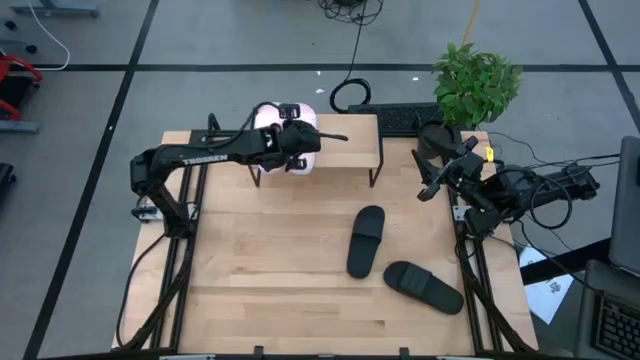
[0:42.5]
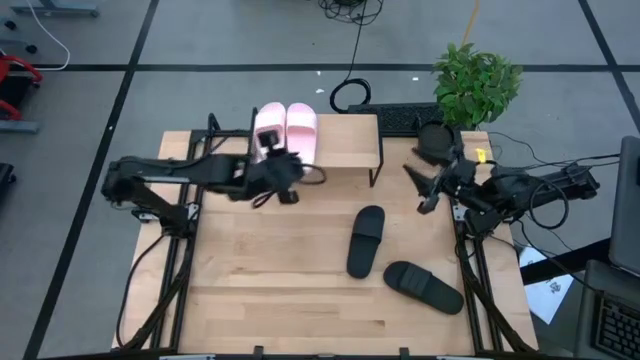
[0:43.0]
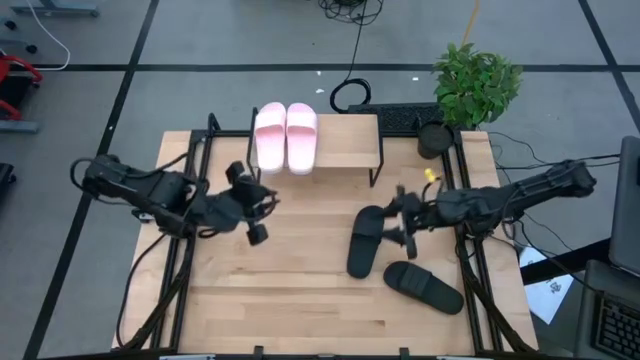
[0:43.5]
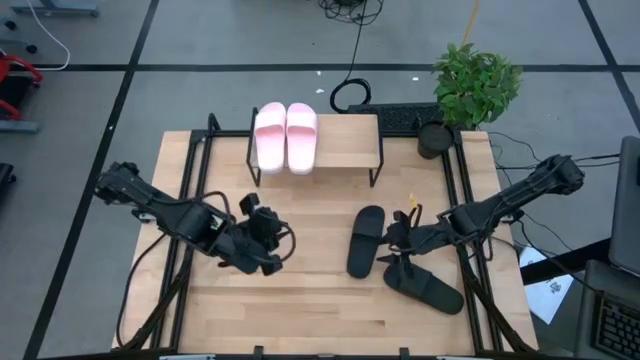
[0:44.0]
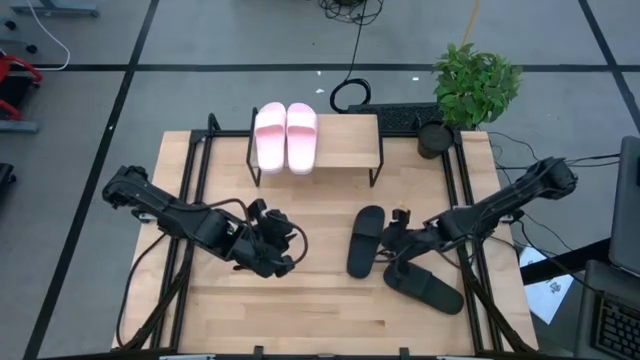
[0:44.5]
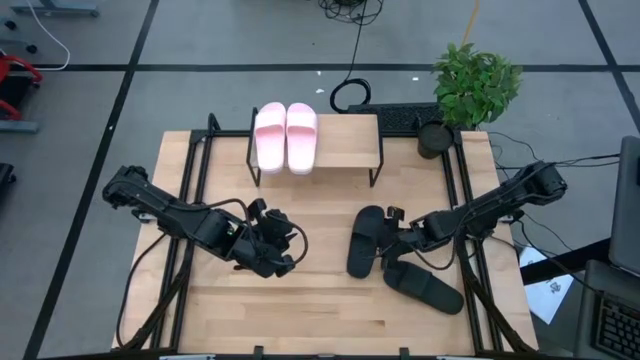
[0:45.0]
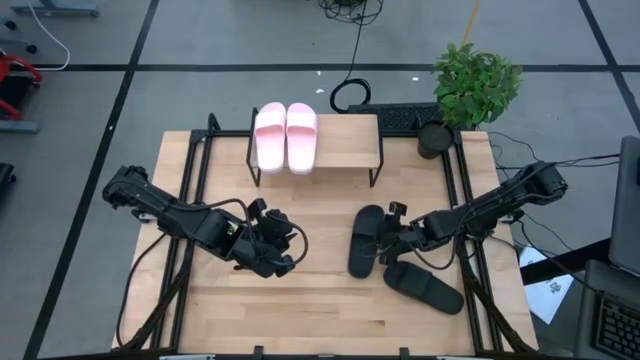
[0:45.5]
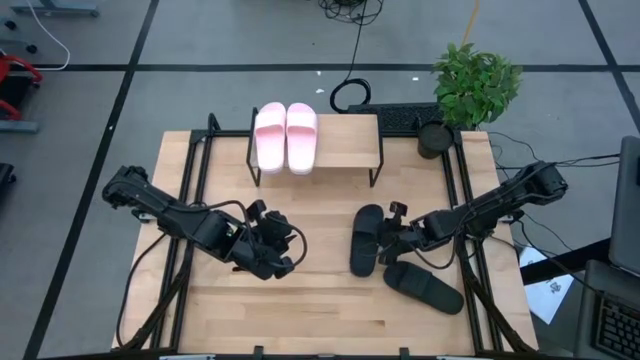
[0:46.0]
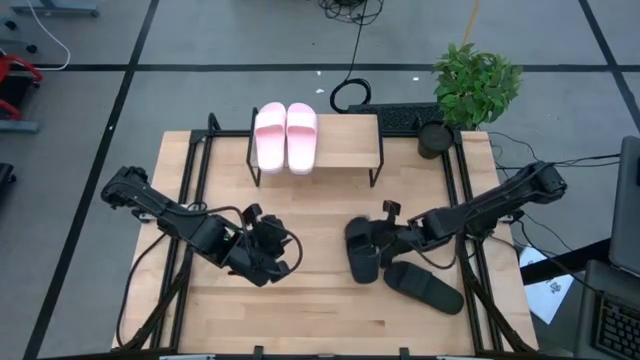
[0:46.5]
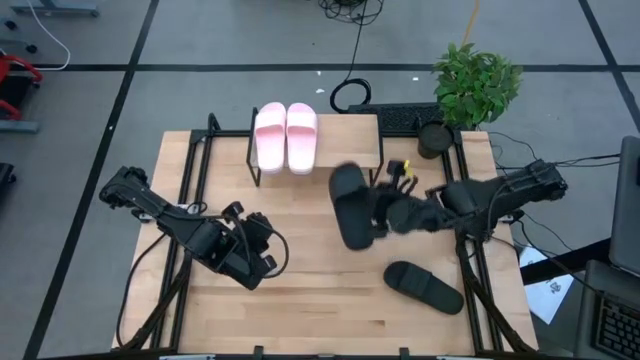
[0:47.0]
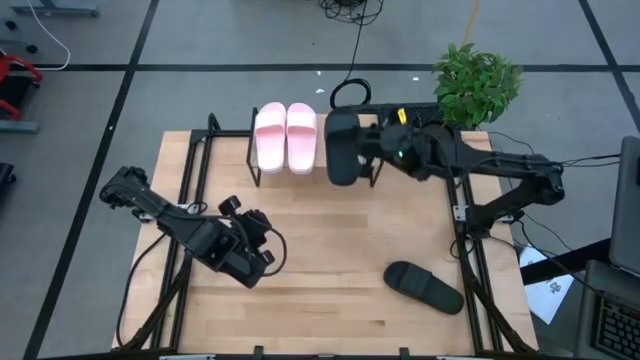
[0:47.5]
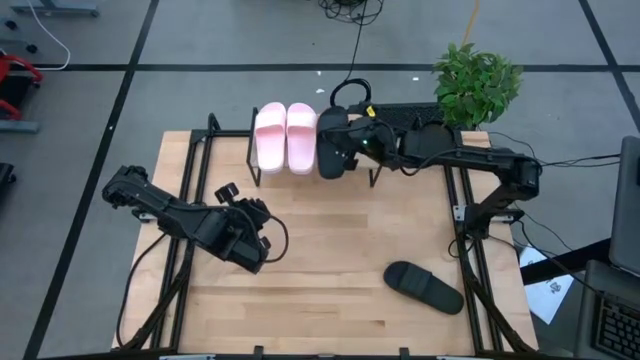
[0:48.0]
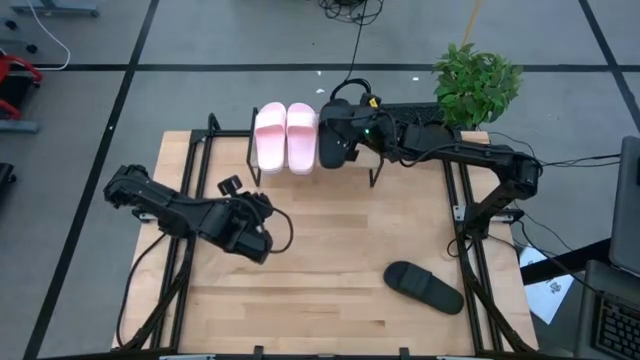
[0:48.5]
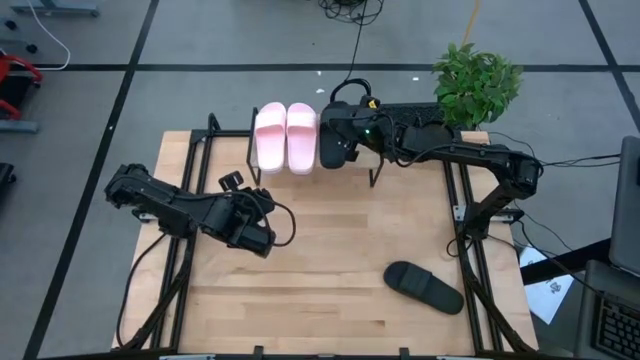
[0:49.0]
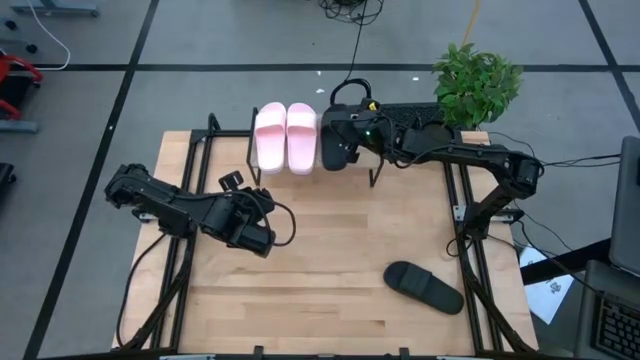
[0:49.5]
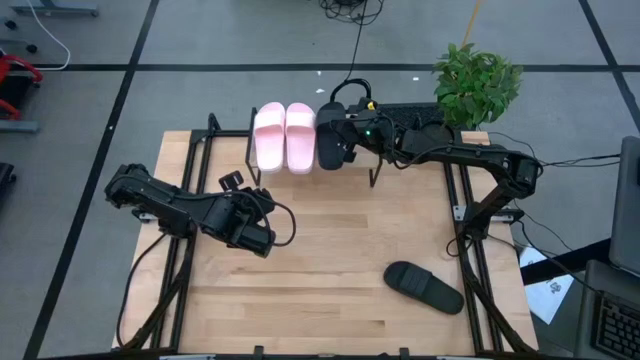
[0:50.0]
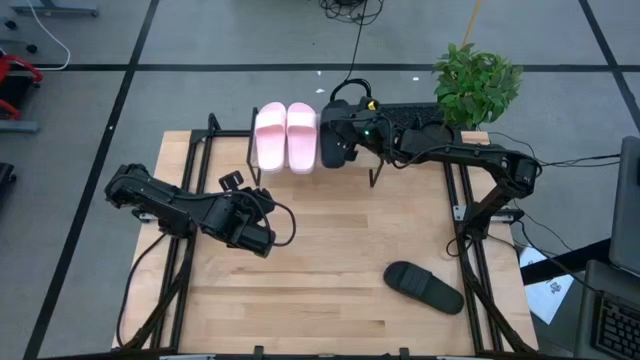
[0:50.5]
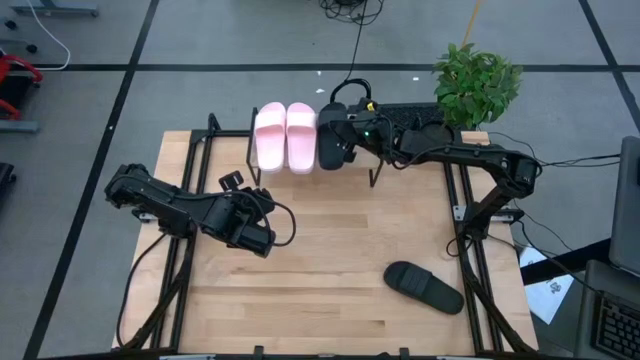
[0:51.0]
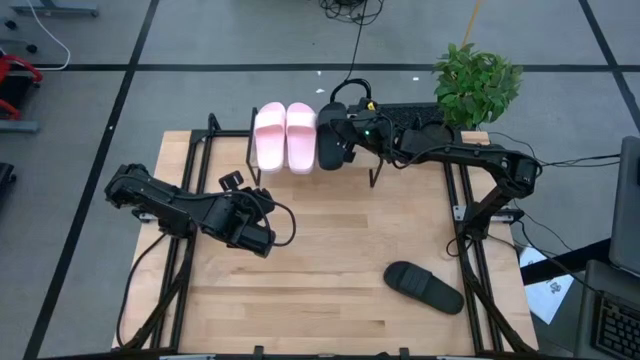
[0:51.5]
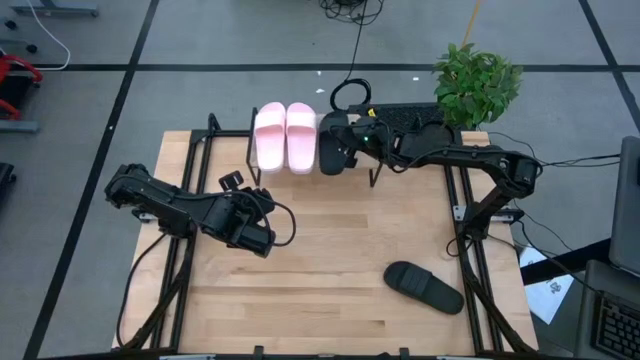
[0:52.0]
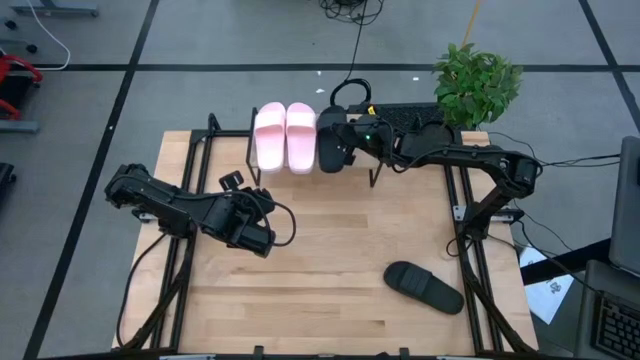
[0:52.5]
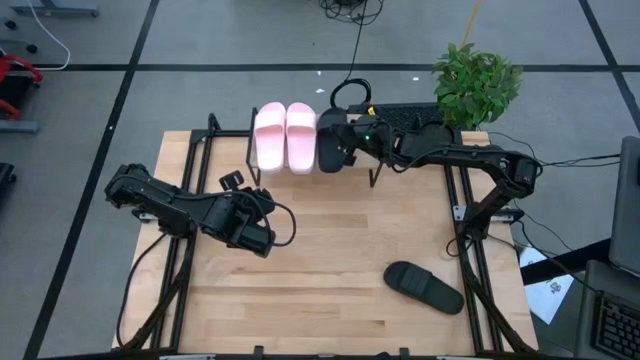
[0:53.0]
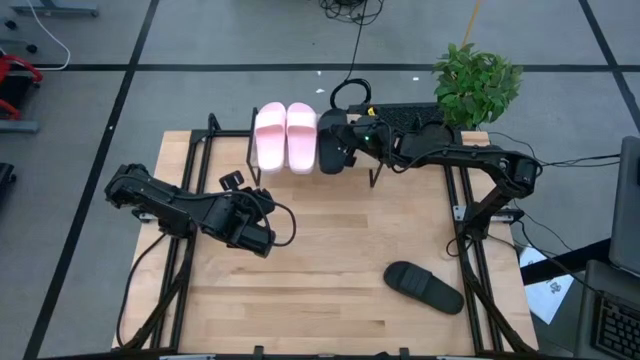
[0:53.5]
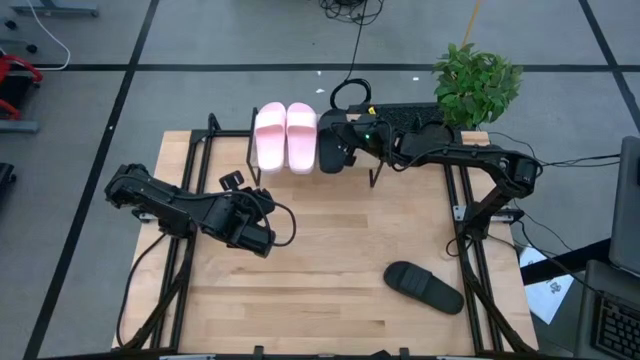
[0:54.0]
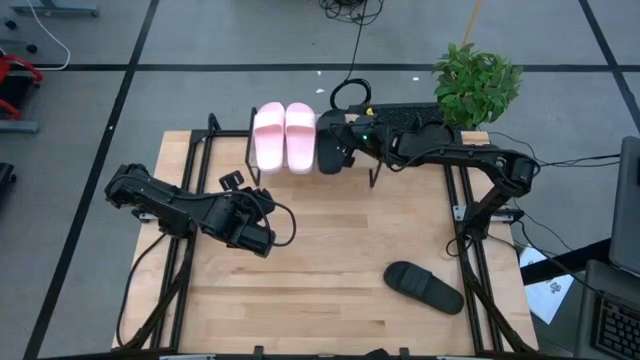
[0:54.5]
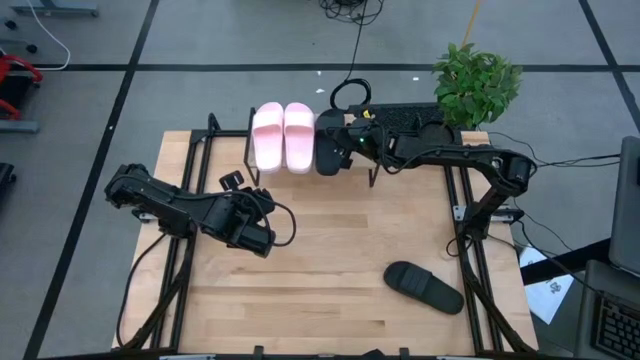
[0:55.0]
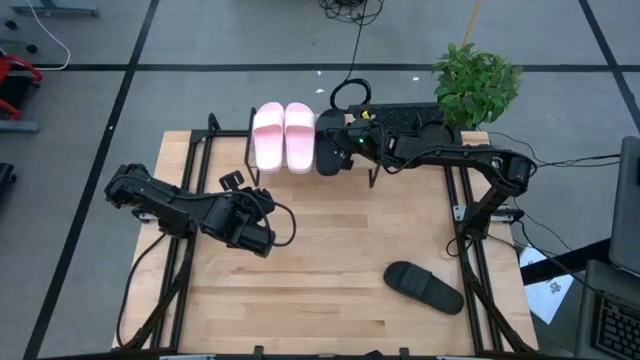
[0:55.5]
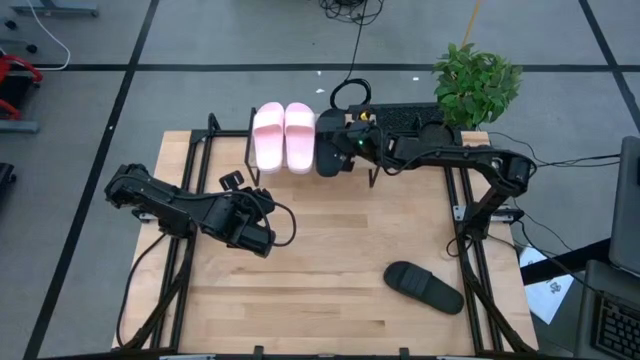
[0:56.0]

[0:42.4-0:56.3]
Task: Pick and place slides into the shelf
Put the top black slide on the shelf

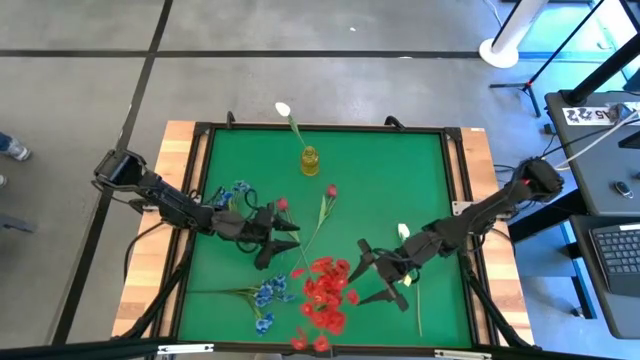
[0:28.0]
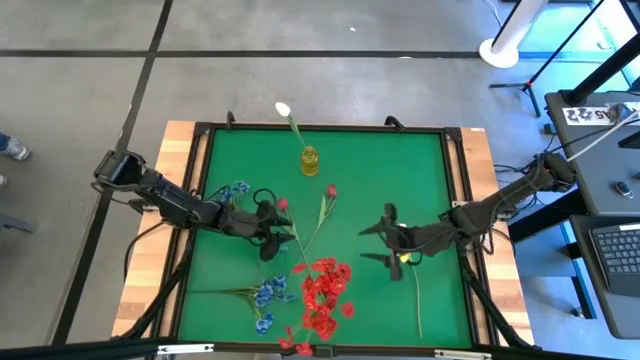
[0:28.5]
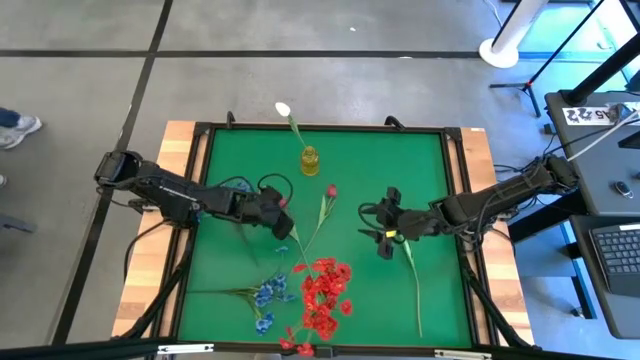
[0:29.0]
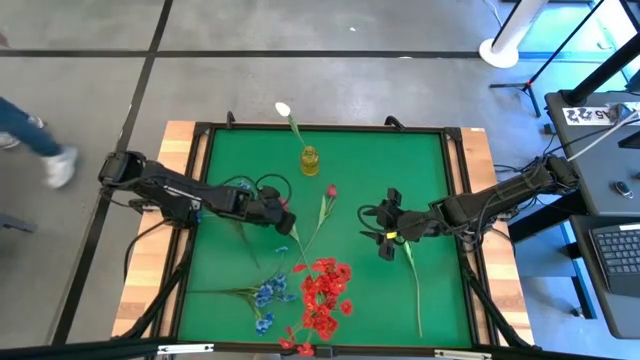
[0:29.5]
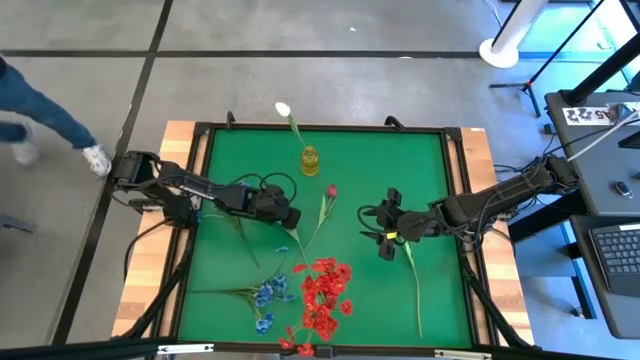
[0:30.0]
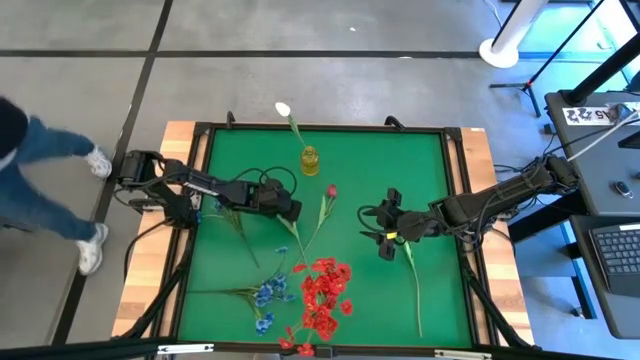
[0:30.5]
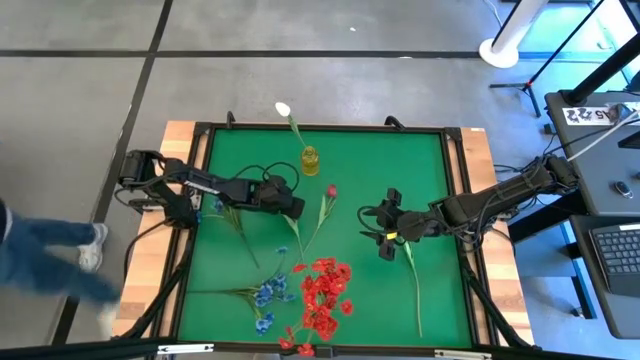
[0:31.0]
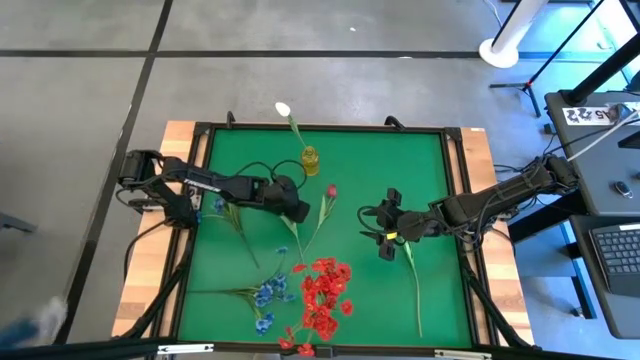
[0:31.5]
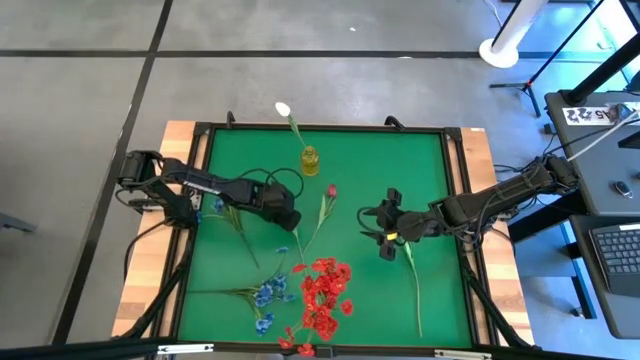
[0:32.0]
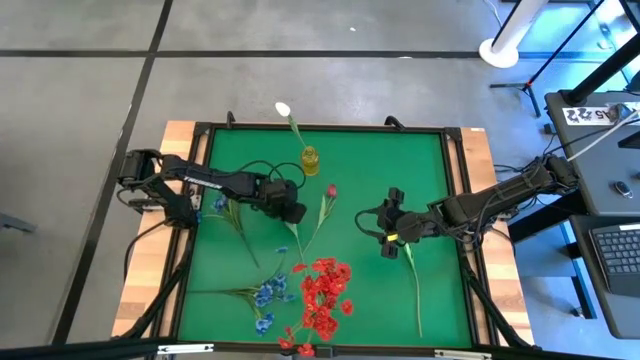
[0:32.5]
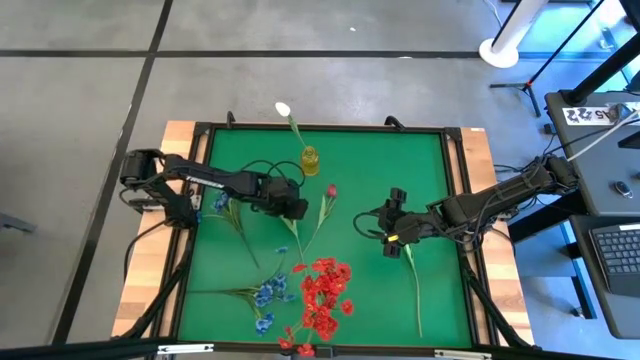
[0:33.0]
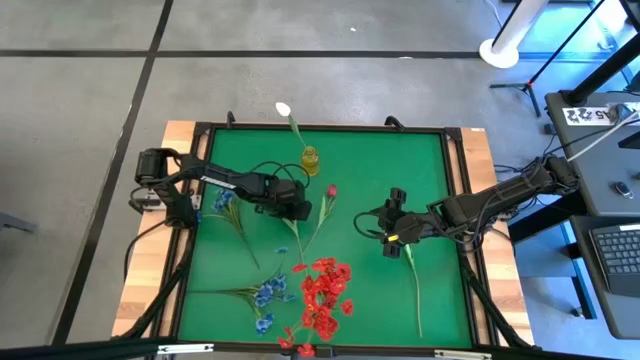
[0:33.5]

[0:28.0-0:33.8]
Task: Sort flowers into vase by color
Put the left red flower into the transparent vase

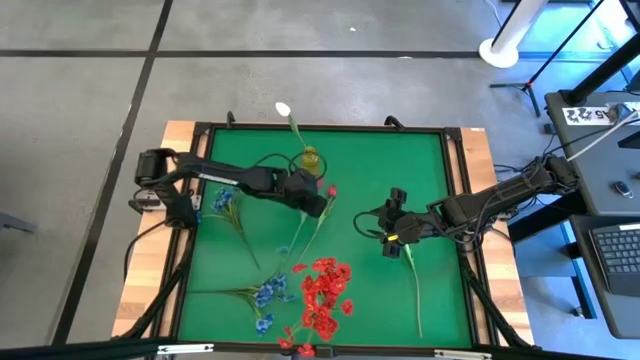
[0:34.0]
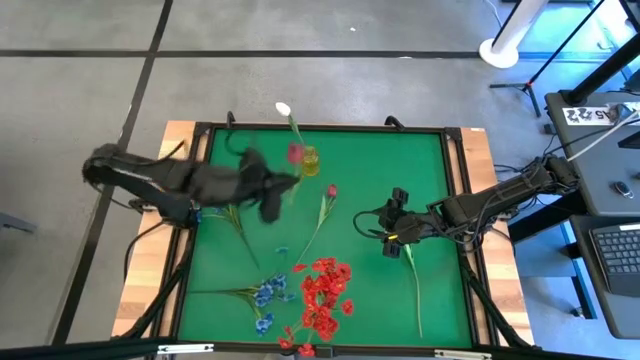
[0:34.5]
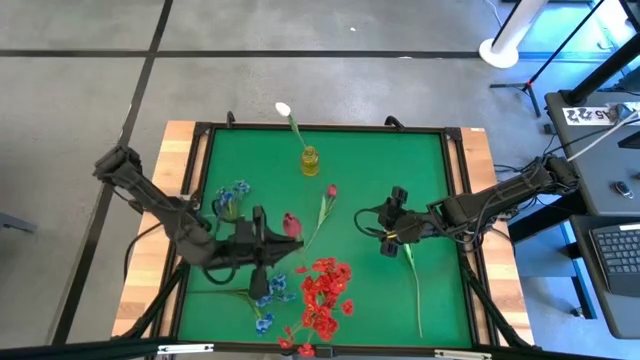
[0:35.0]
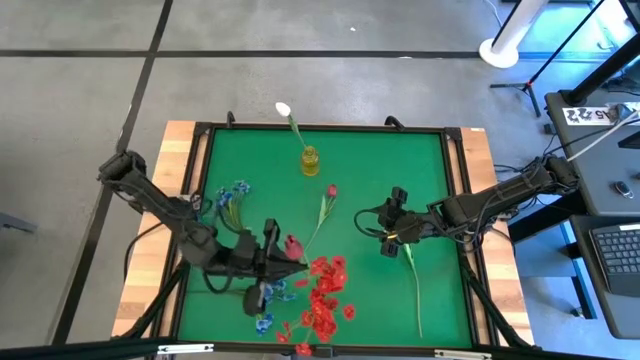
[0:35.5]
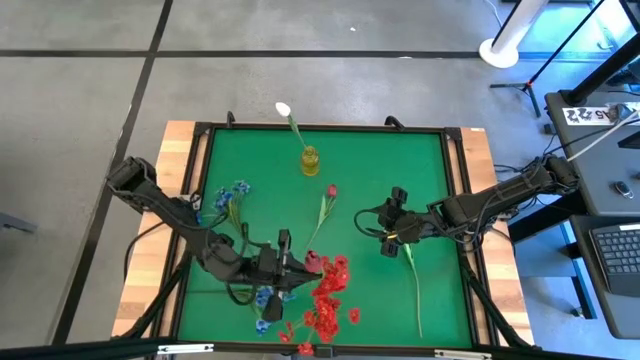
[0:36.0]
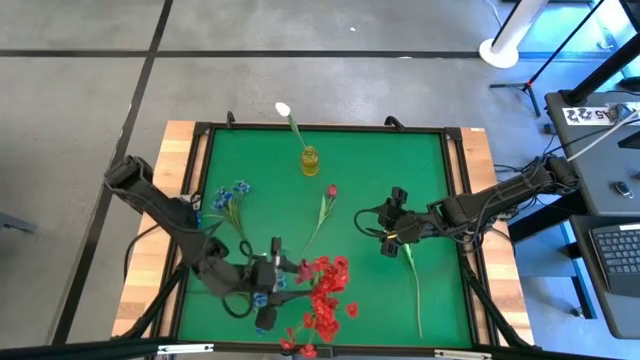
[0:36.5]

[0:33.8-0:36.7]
Put the left red flower into the transparent vase
